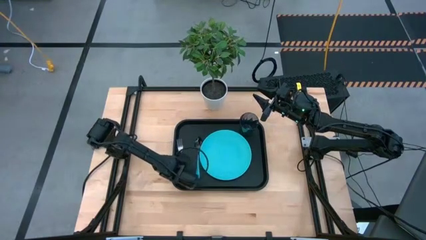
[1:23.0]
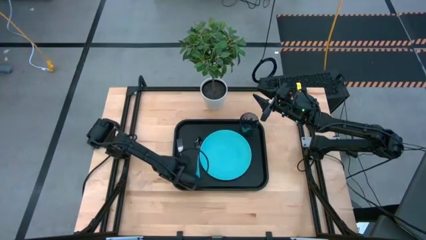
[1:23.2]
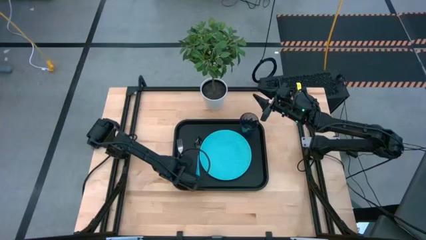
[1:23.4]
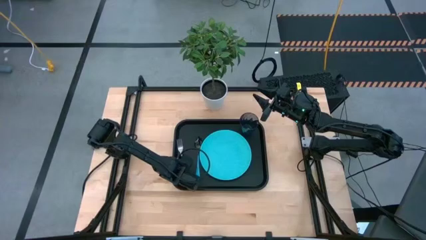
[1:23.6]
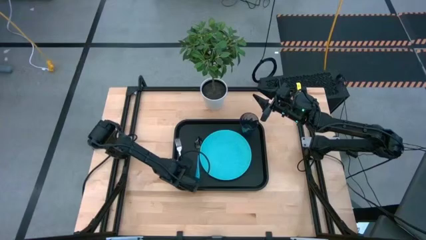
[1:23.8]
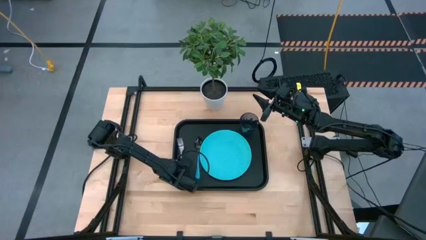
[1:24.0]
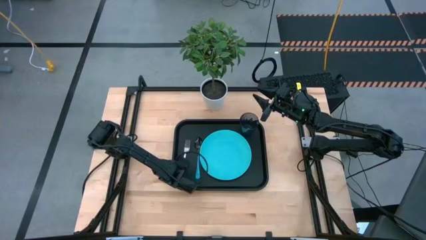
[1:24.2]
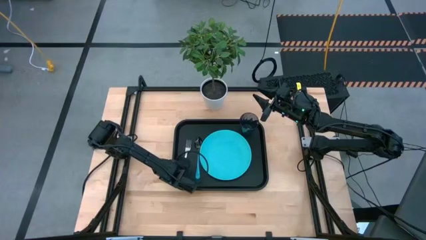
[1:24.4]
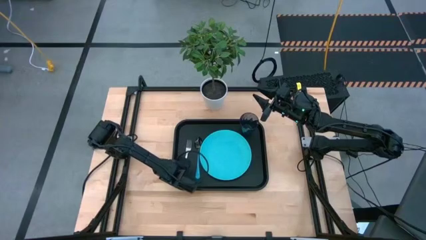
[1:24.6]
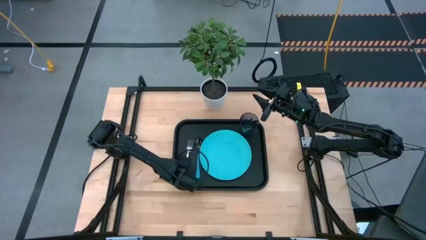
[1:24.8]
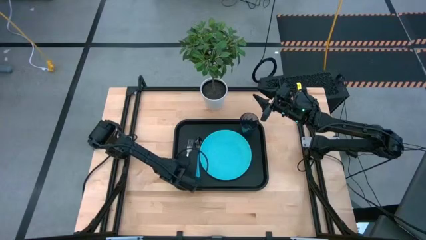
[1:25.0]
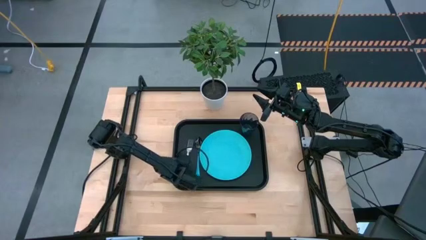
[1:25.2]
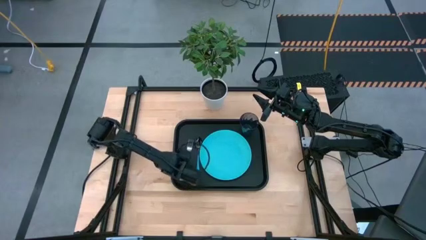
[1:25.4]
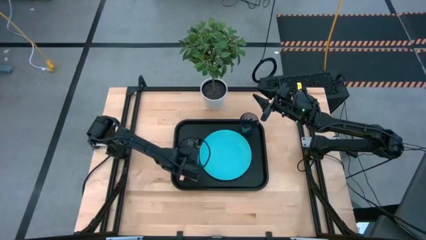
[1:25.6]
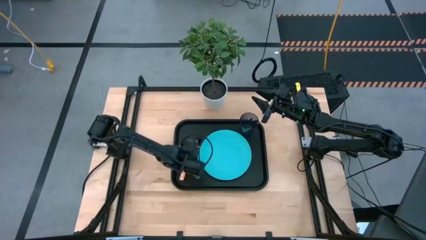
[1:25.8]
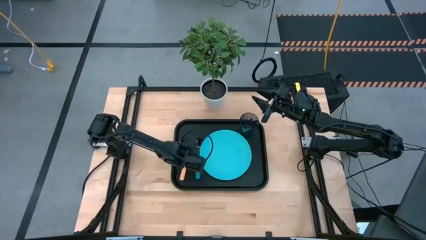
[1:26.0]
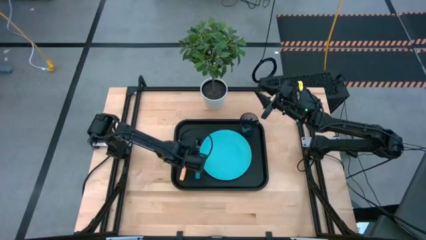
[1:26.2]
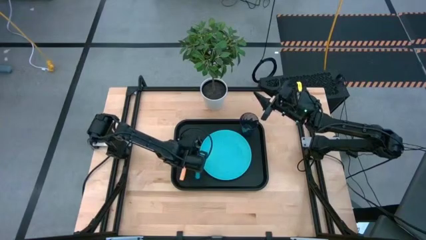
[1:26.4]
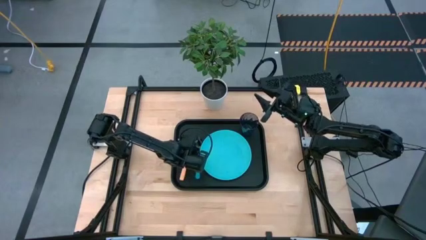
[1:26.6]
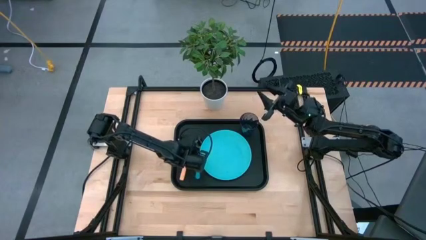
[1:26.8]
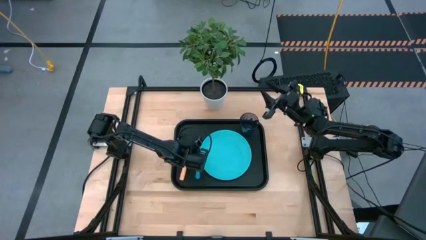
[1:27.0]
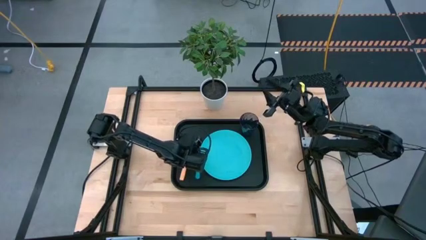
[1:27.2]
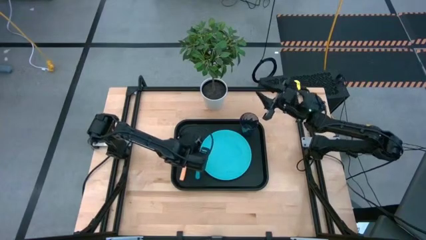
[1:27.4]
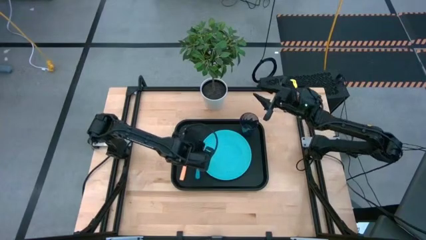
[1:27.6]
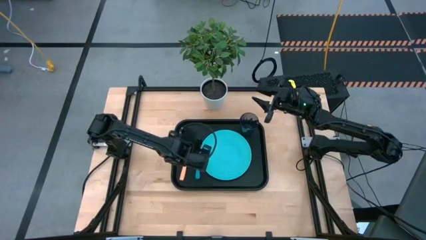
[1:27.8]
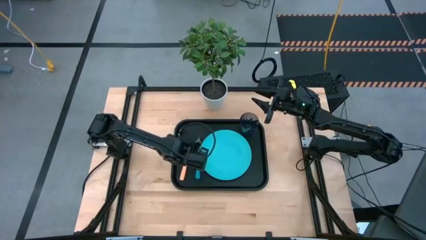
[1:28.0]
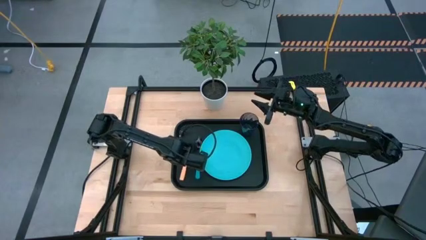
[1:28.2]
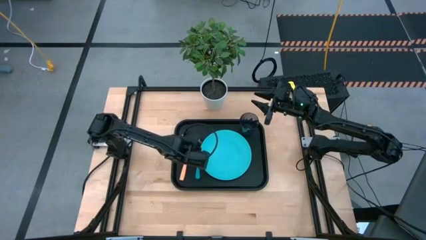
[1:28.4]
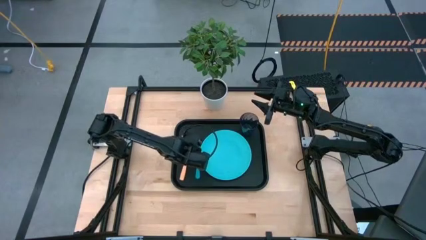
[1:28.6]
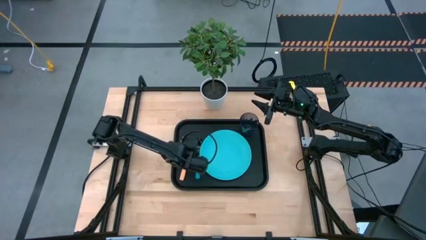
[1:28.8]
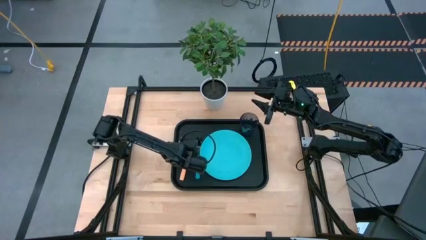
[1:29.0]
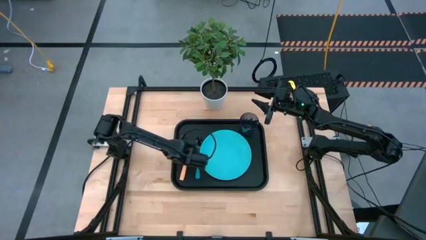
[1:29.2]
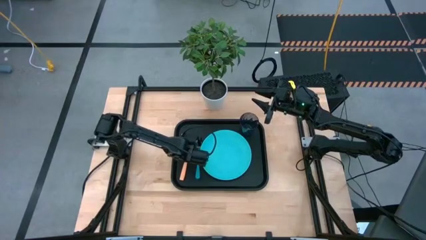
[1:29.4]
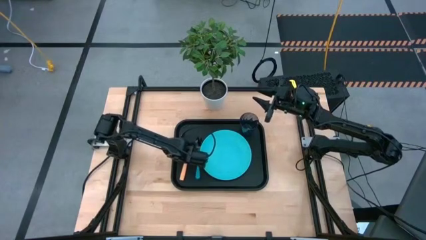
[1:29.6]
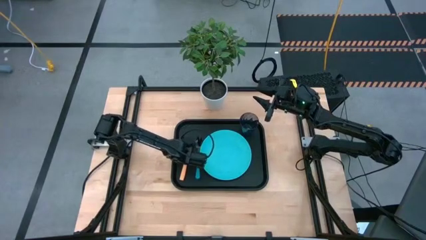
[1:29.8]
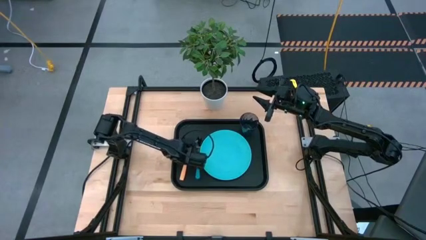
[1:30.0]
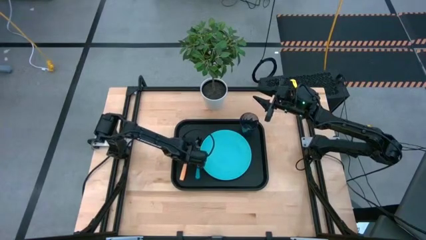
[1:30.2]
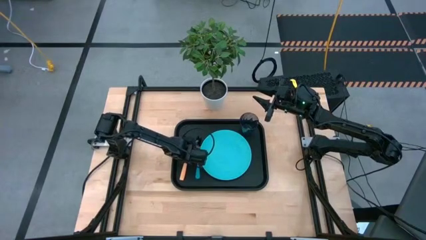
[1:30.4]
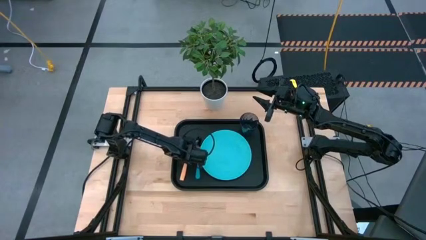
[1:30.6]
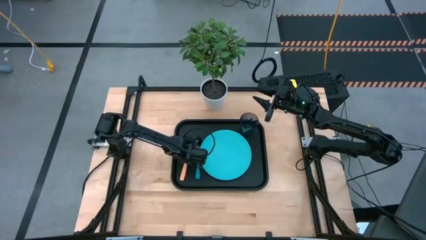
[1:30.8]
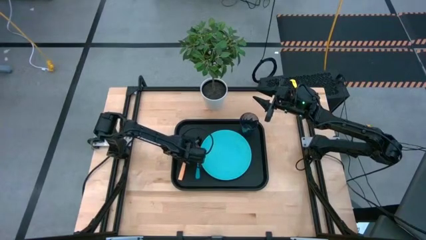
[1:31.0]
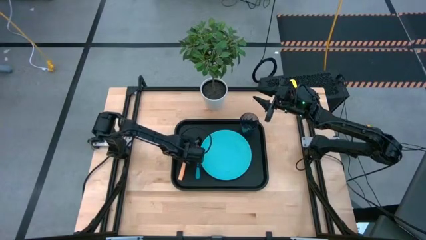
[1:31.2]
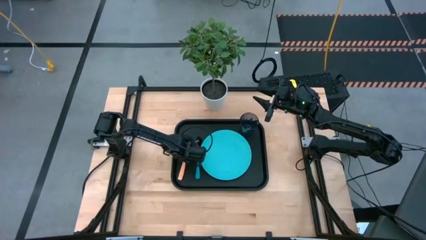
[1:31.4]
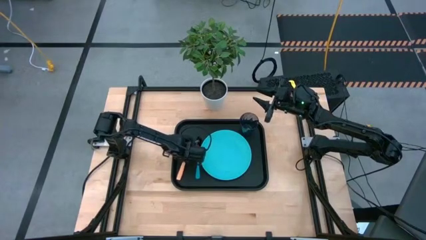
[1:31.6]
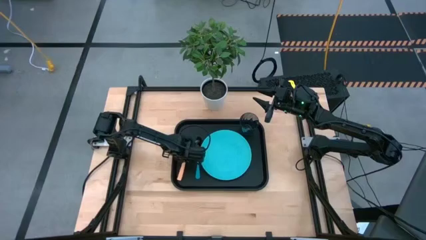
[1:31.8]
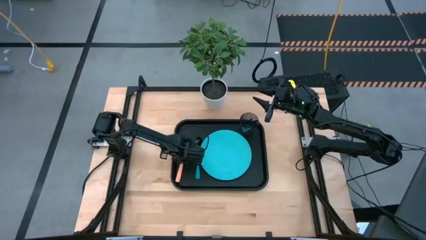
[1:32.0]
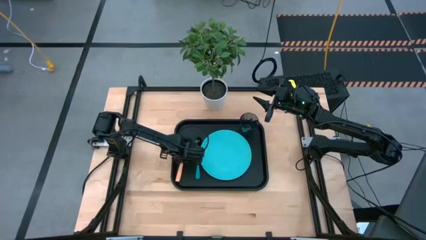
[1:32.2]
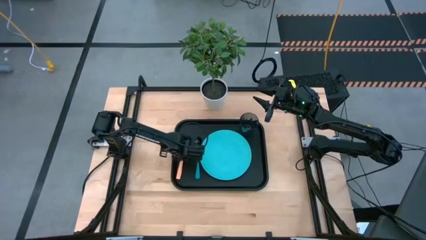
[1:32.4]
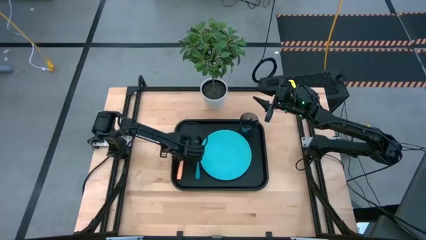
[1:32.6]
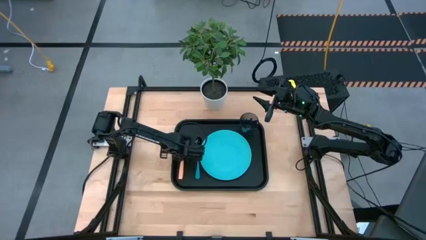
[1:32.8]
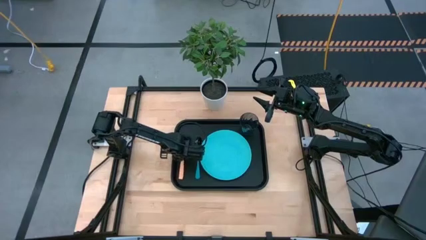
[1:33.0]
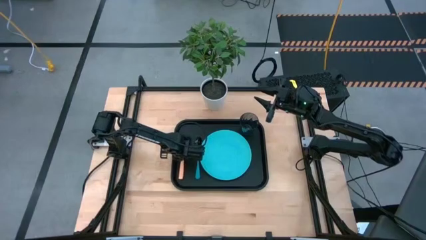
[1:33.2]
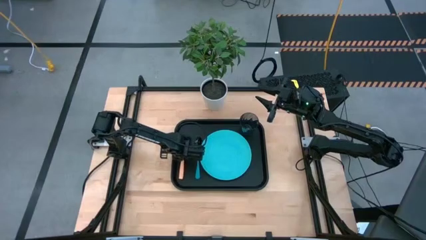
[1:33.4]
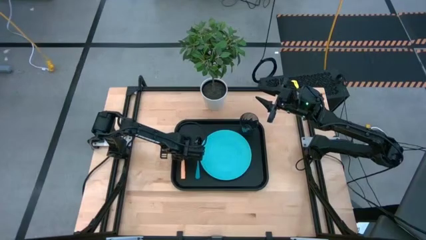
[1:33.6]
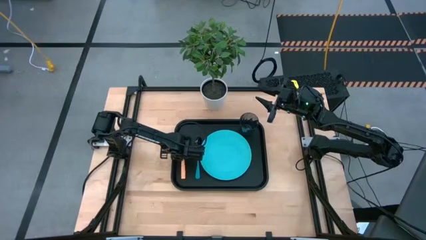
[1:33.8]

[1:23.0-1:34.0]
Task: Pick and place plate/cup/fork/spoon on tray
Adjust the yellow fork on the black tray

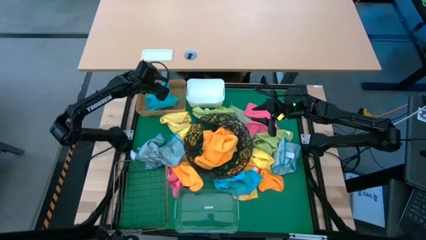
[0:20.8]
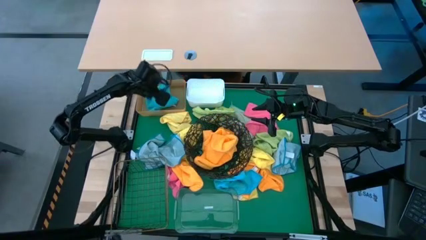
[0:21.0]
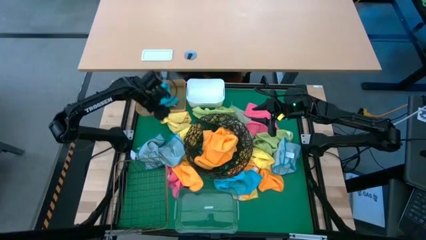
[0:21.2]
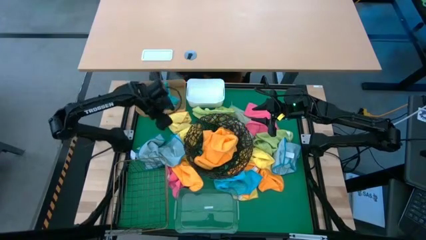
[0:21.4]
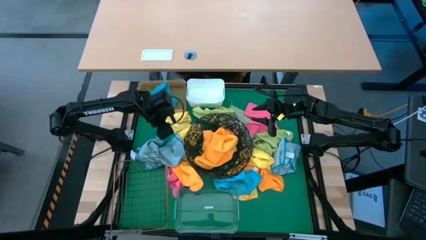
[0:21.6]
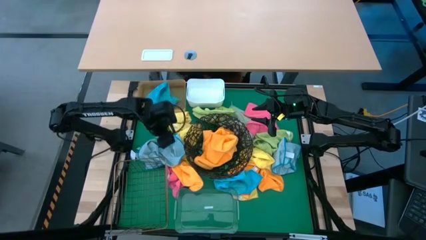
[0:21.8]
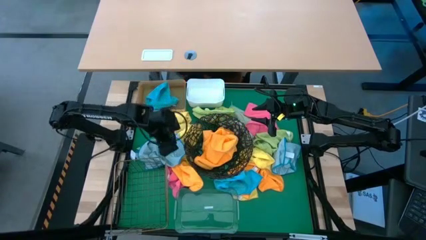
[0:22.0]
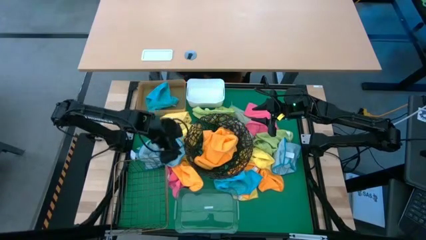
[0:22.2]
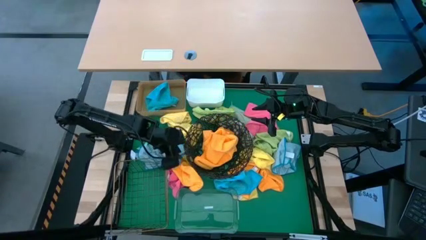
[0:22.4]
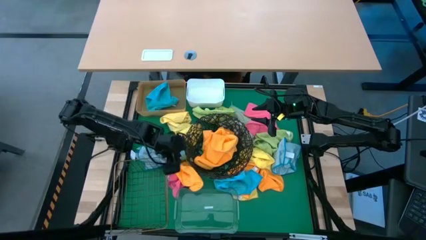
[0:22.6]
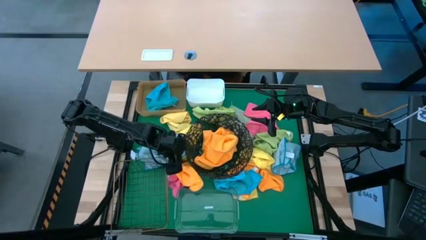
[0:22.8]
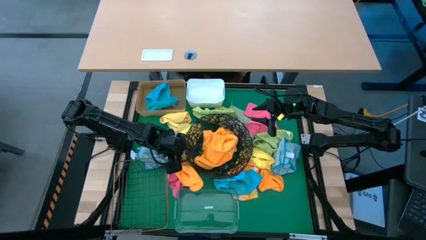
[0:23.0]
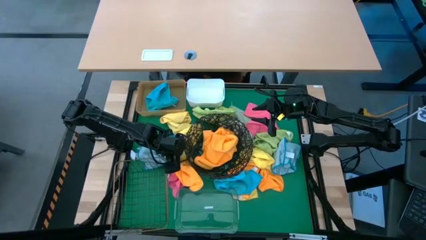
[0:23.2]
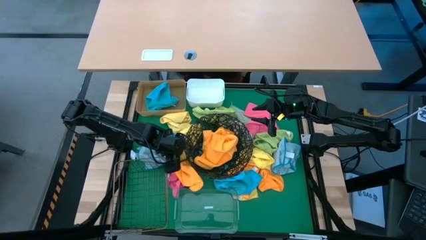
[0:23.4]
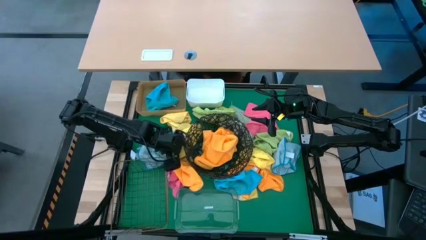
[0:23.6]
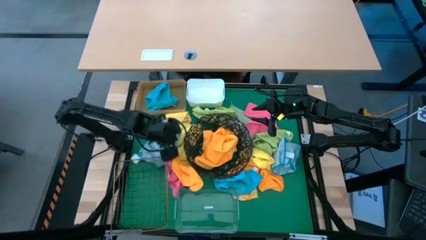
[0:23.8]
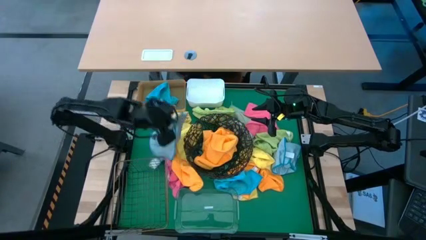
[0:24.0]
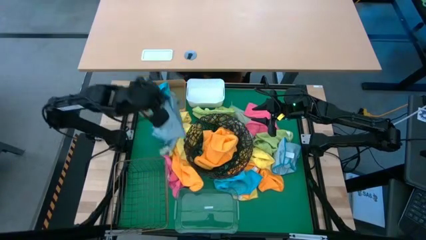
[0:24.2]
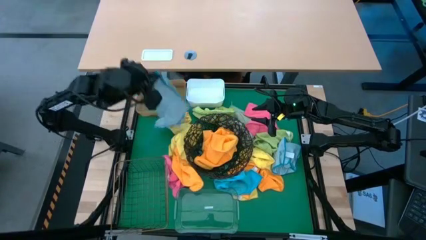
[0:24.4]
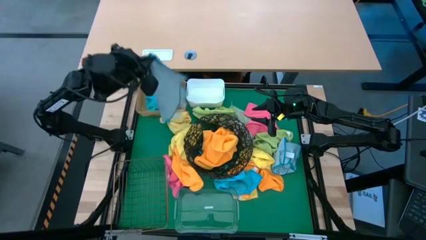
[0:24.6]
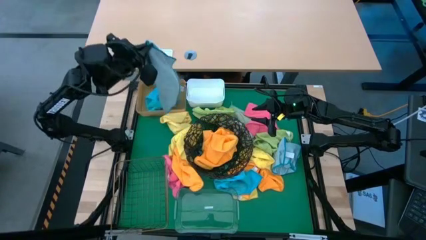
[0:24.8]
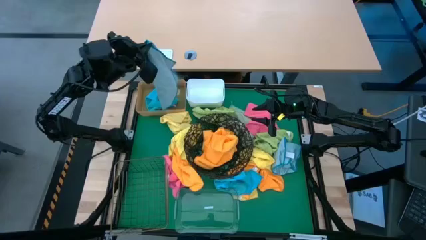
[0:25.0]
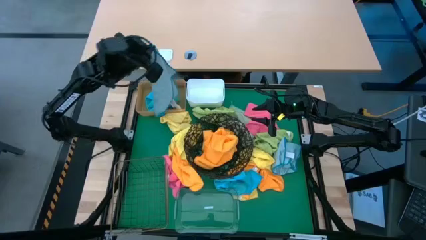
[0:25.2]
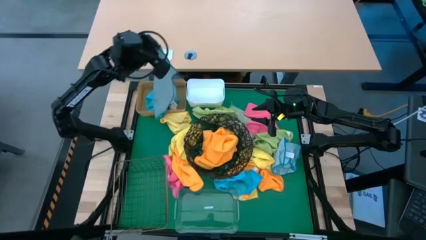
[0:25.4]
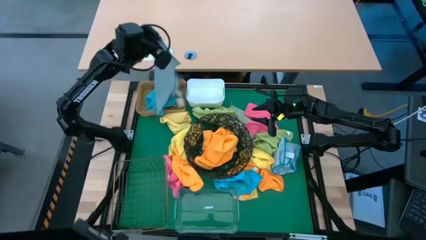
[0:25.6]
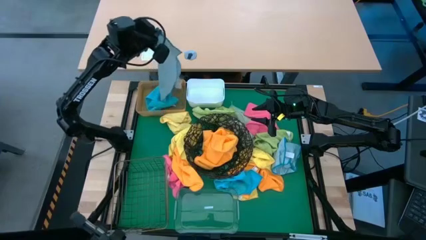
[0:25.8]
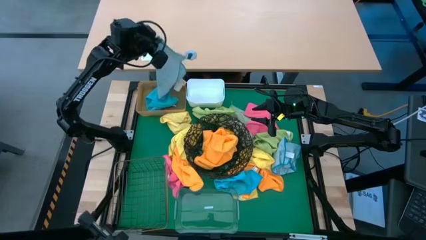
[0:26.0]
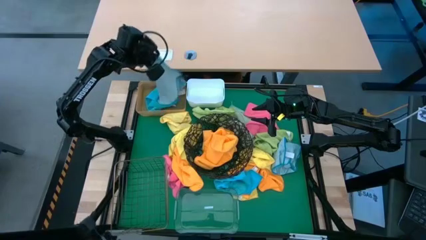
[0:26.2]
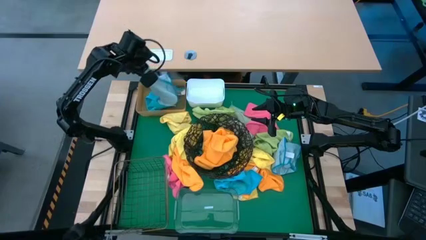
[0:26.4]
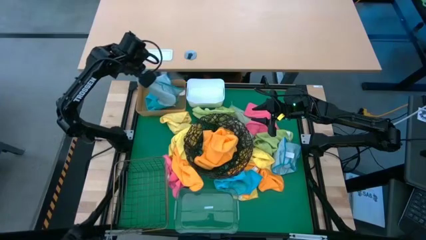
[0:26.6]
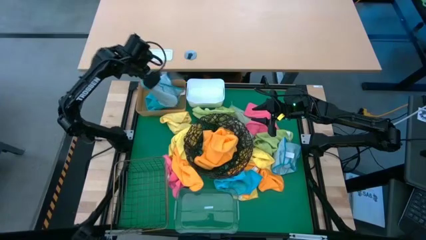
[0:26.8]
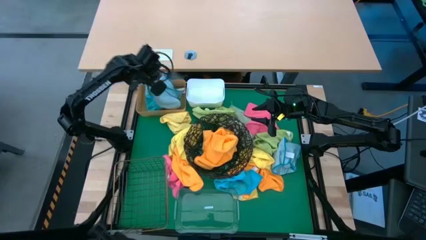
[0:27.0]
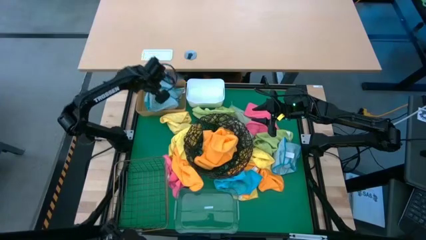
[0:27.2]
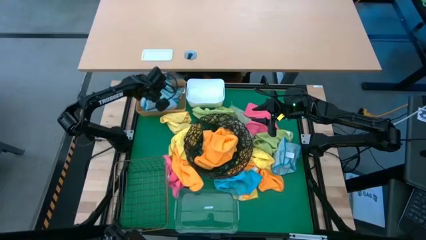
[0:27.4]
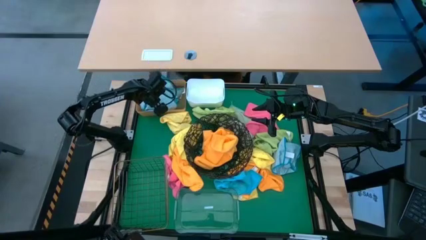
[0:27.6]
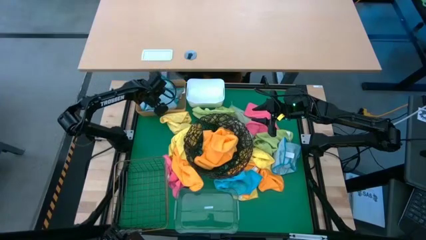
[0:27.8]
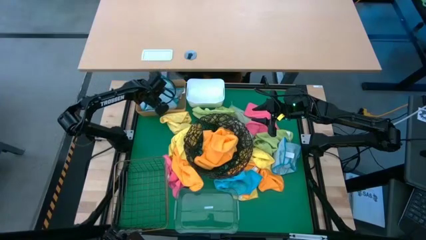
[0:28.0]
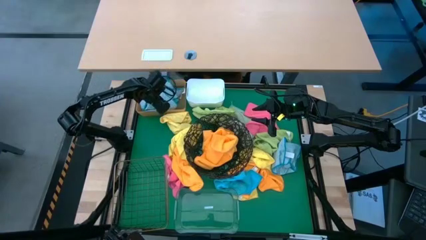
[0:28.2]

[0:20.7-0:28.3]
Task: Sort microfiber towel by color & place in baskets
Put the blue towel into the orange bin
